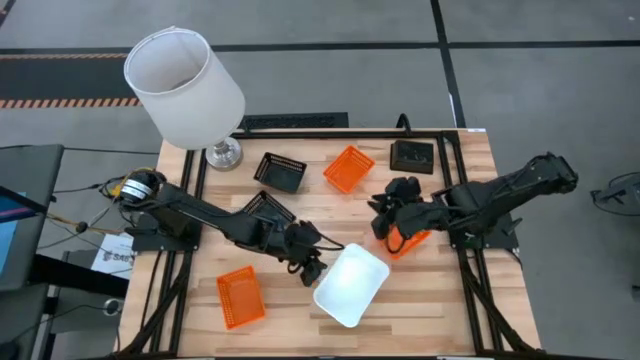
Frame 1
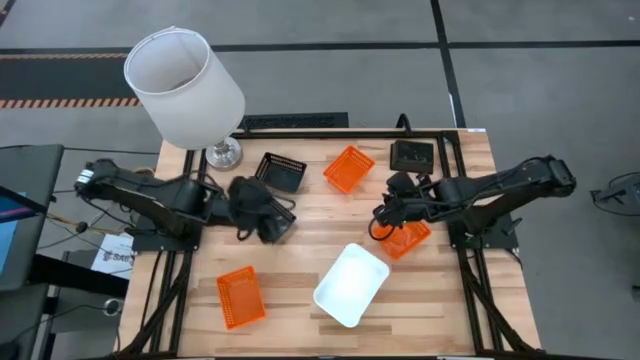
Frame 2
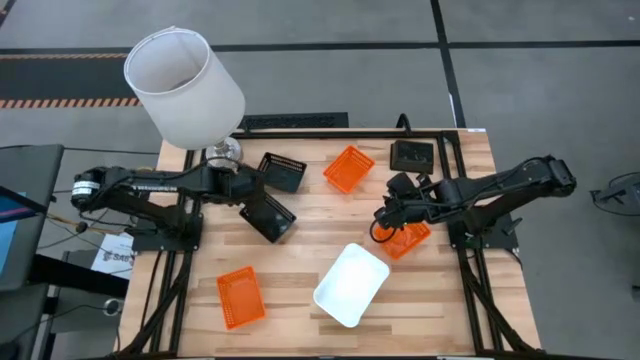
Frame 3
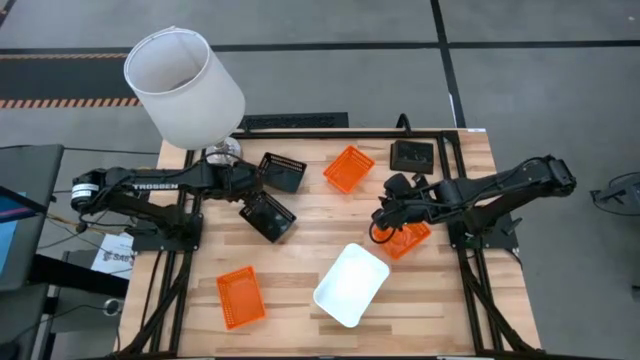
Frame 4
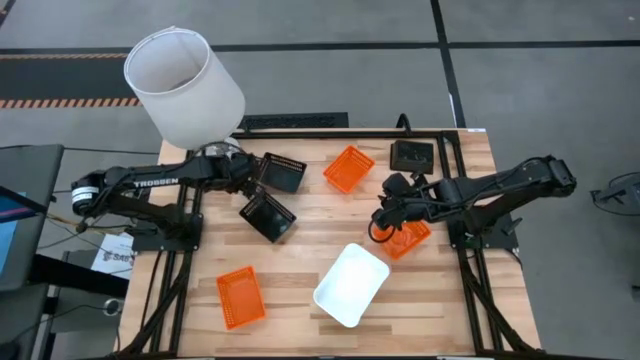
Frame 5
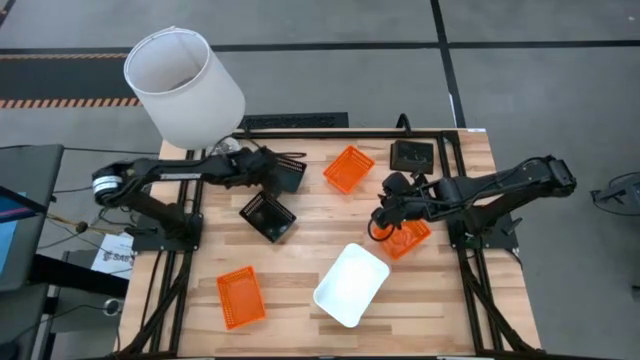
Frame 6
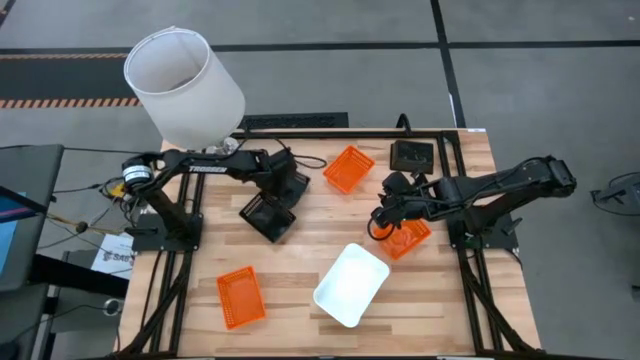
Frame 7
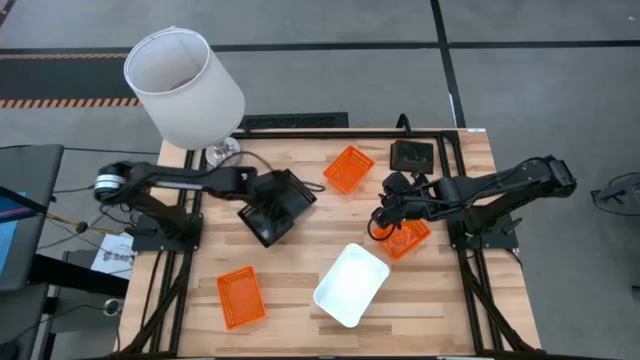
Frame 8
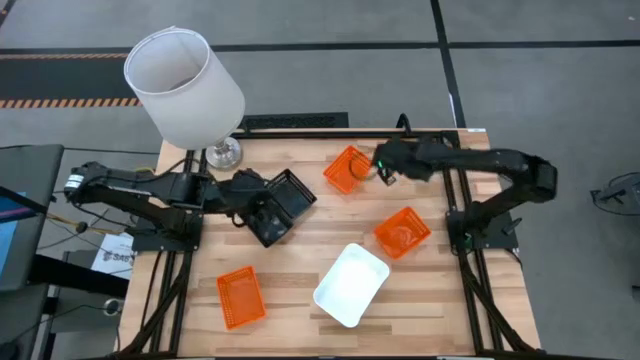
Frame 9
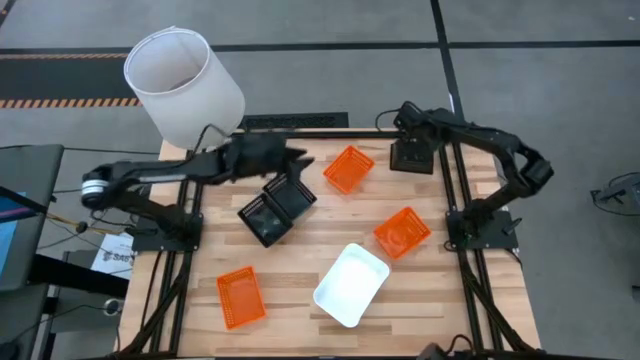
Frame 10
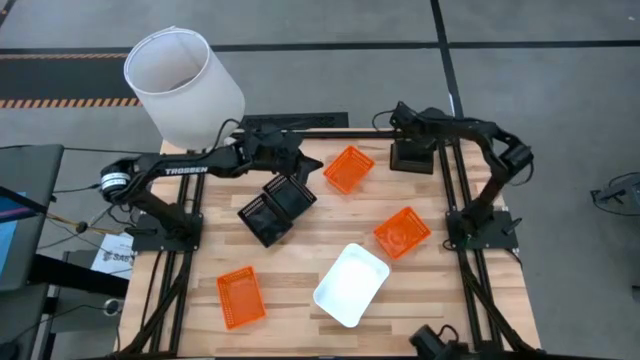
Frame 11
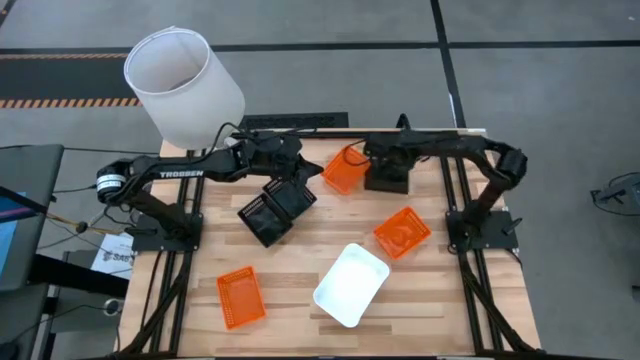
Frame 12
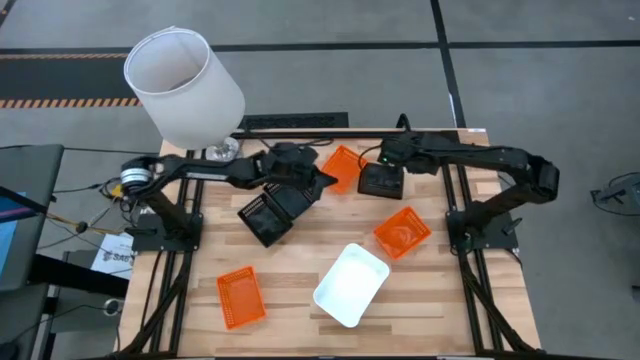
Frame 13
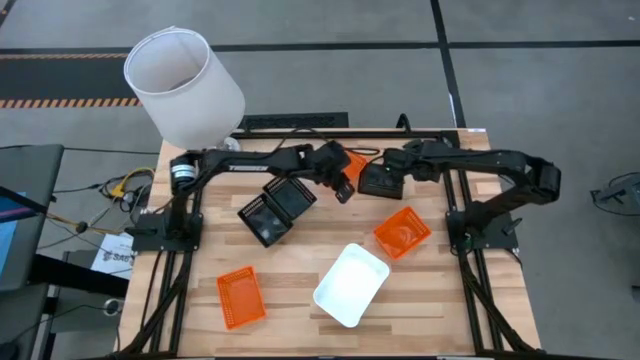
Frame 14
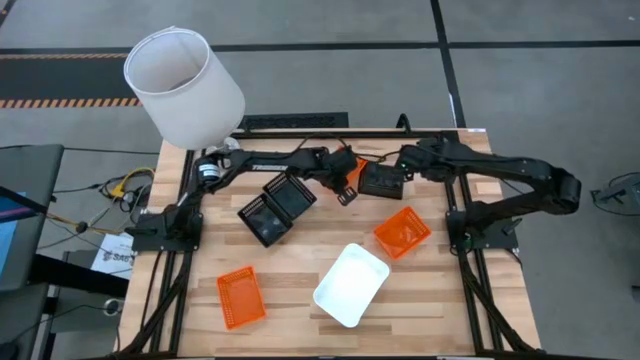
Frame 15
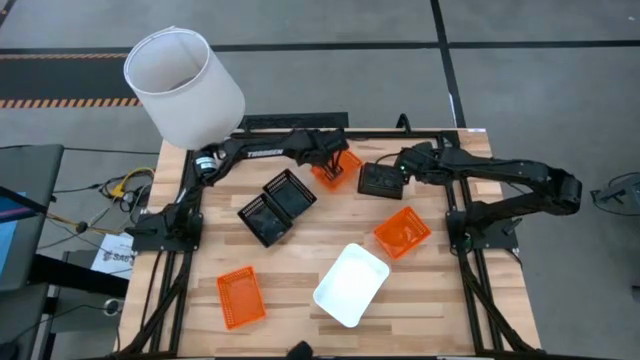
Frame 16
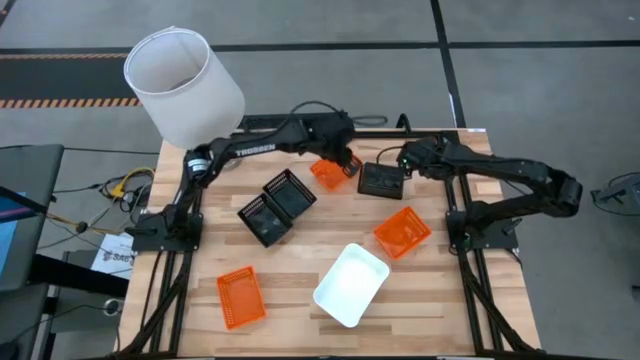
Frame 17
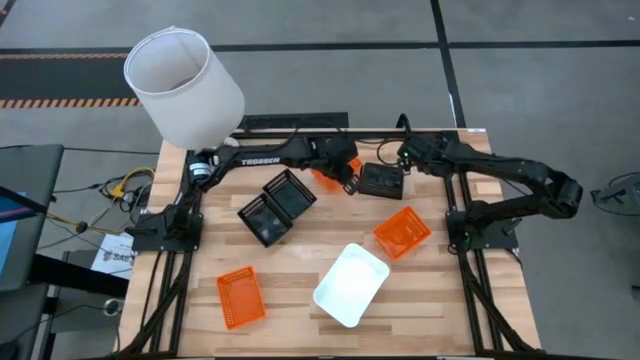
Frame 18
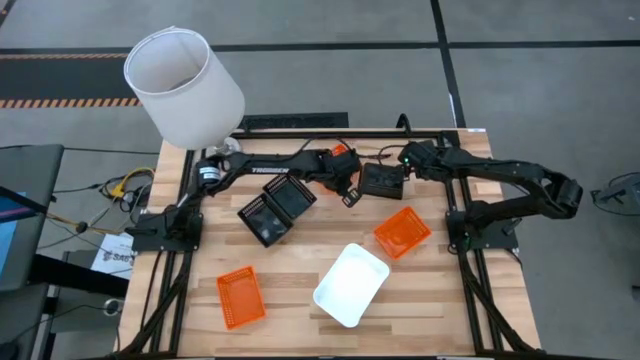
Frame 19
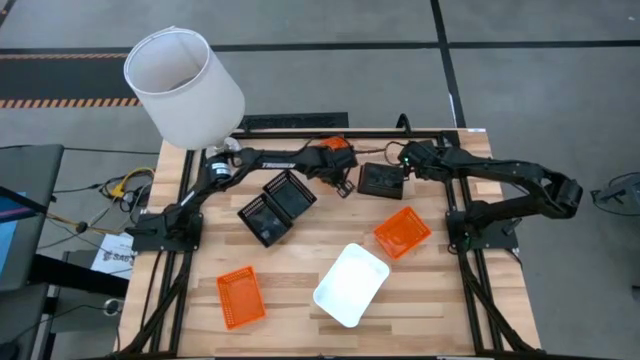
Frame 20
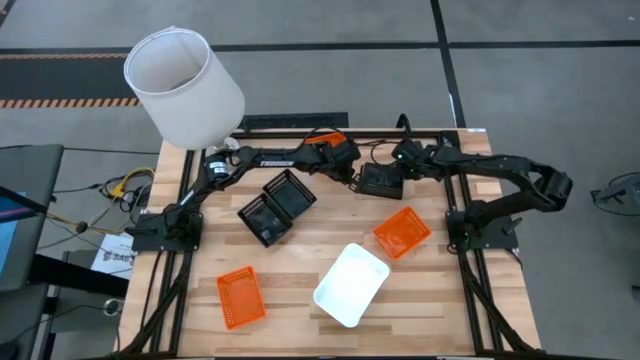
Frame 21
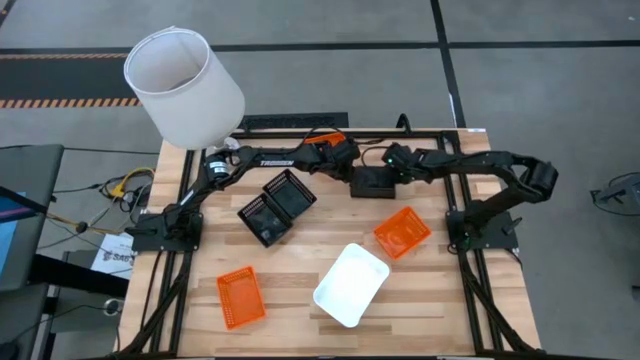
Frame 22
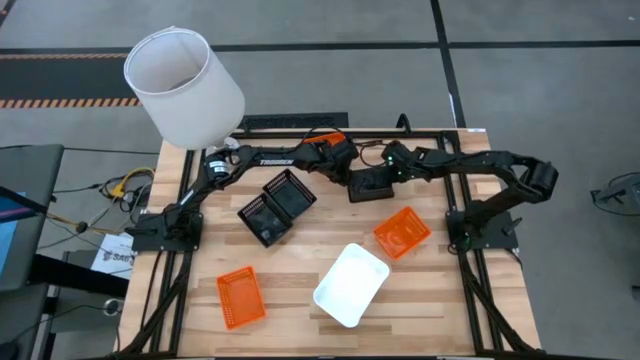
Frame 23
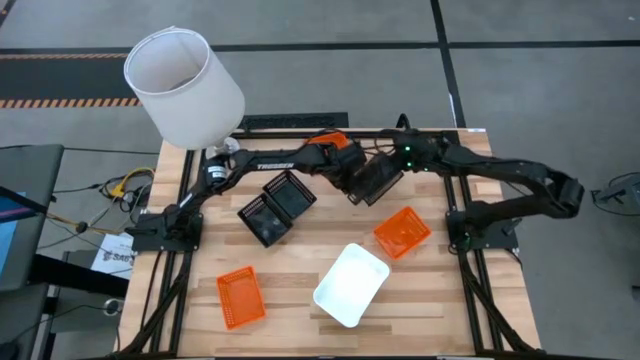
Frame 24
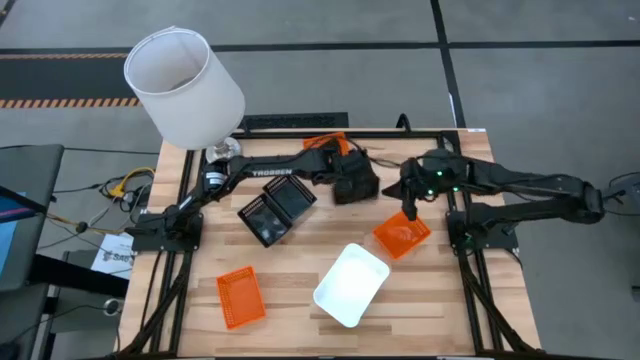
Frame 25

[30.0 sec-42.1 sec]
Adjust the bins

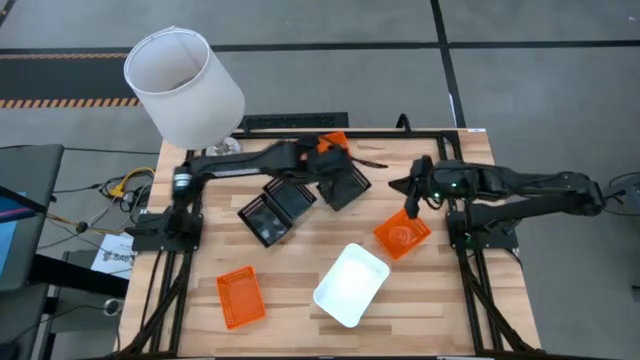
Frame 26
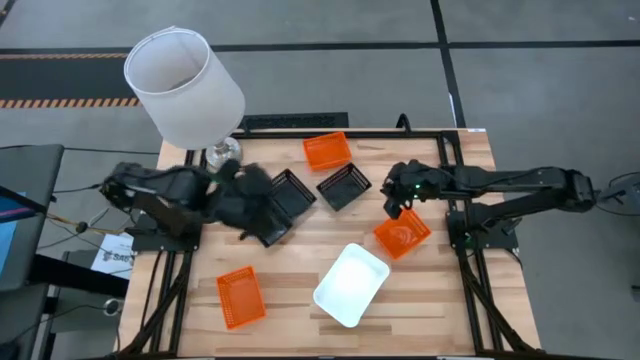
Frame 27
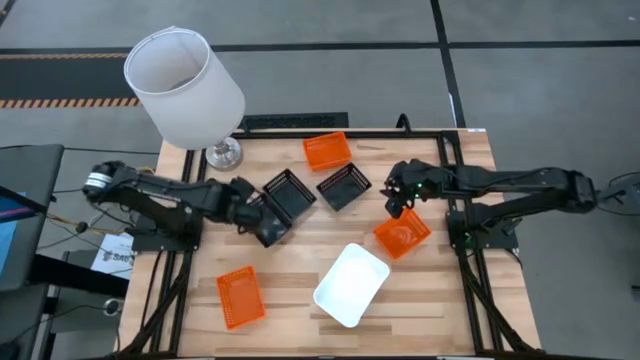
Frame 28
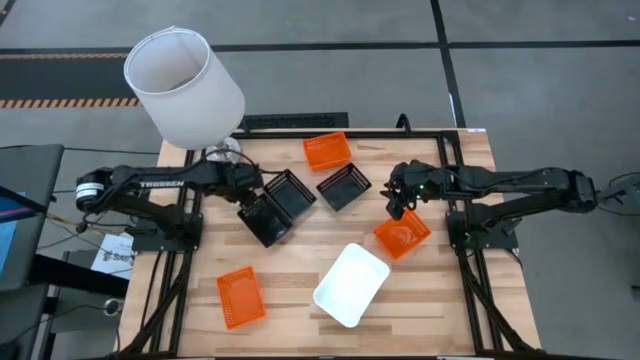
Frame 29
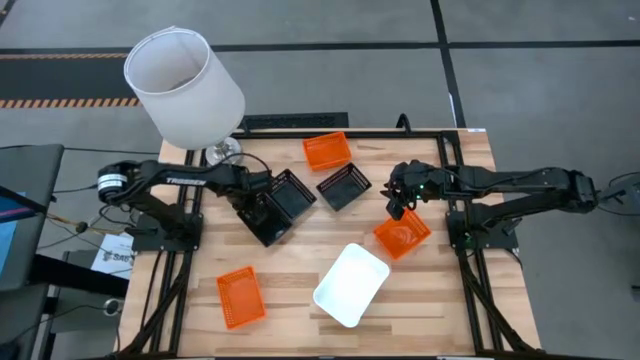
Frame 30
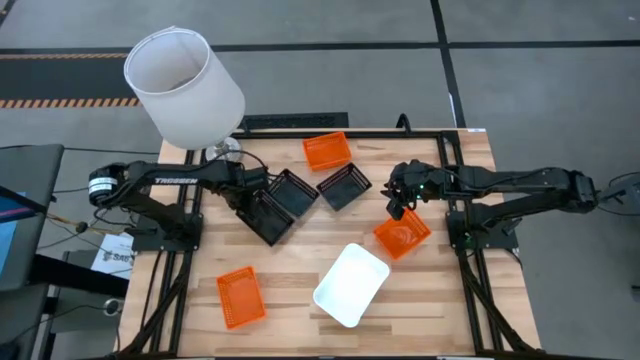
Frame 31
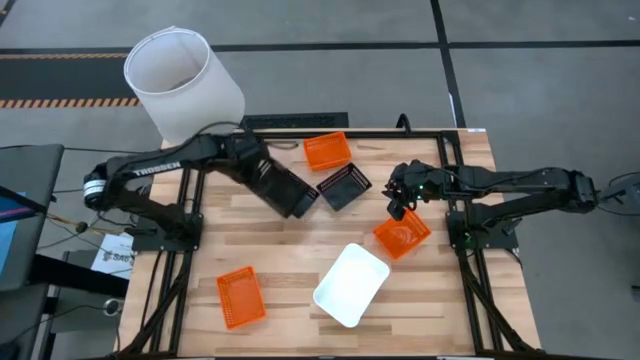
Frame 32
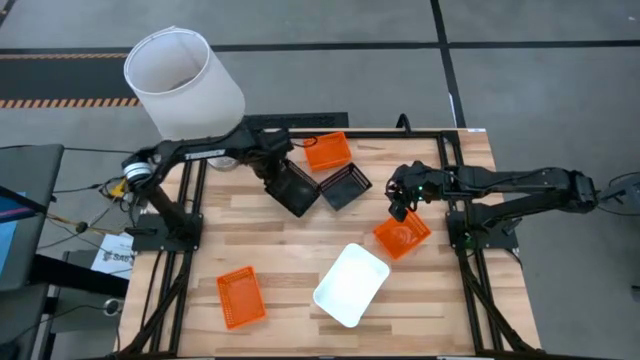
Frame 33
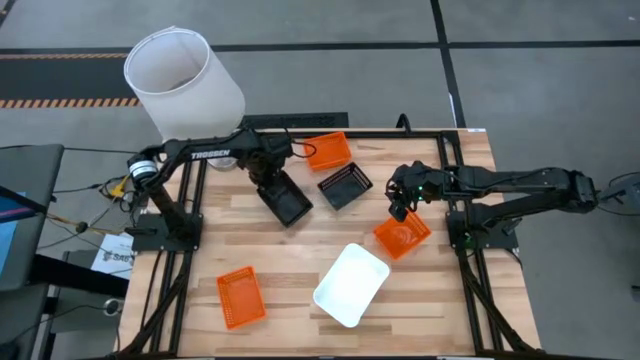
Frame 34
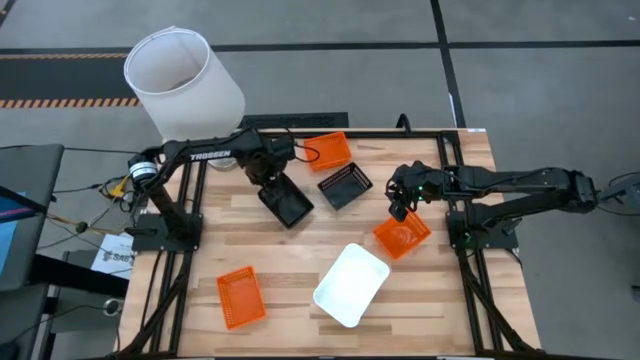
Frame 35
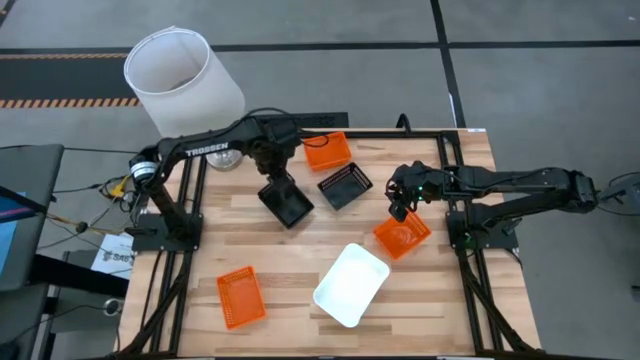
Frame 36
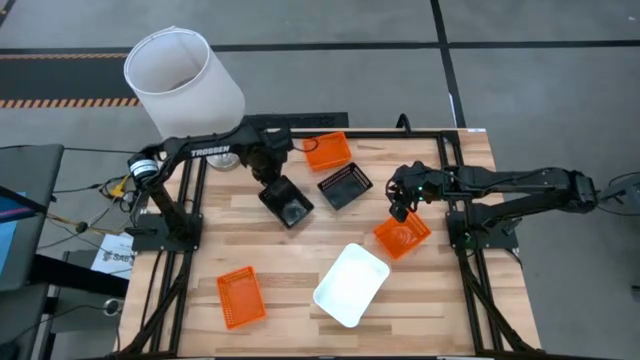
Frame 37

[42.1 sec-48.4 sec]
Stack the bottom black bin on the top left black bin

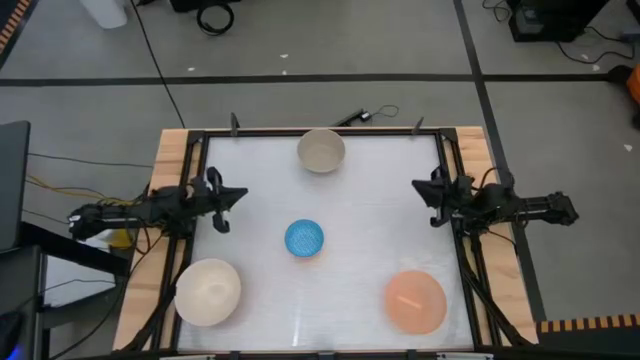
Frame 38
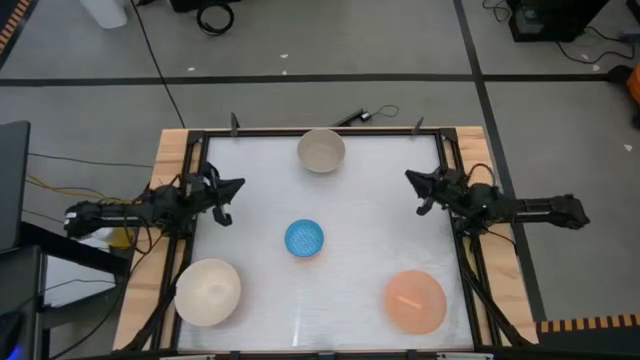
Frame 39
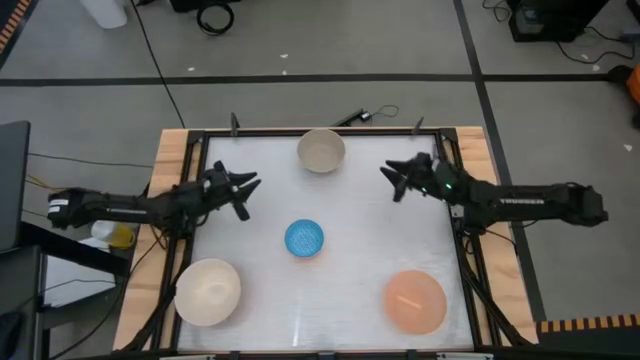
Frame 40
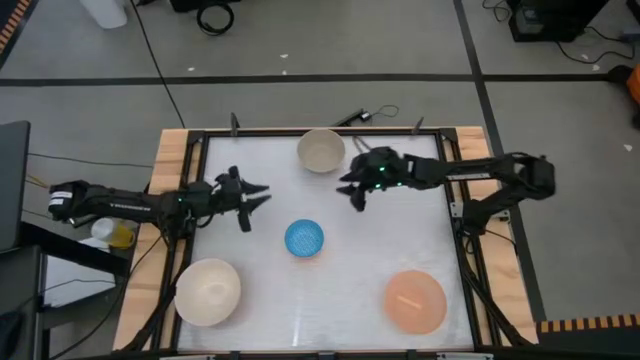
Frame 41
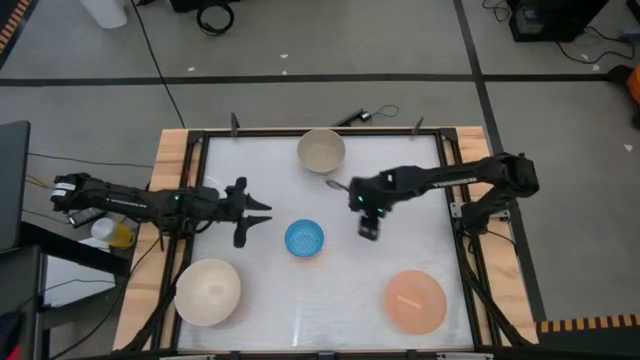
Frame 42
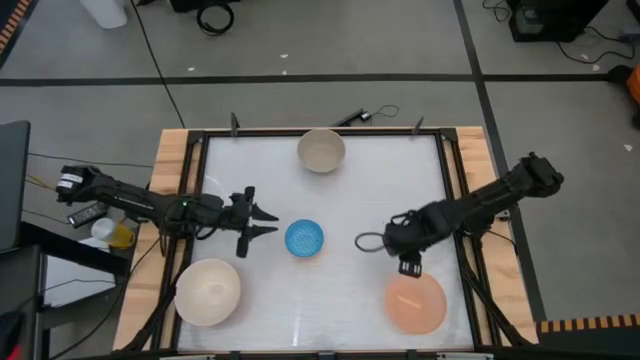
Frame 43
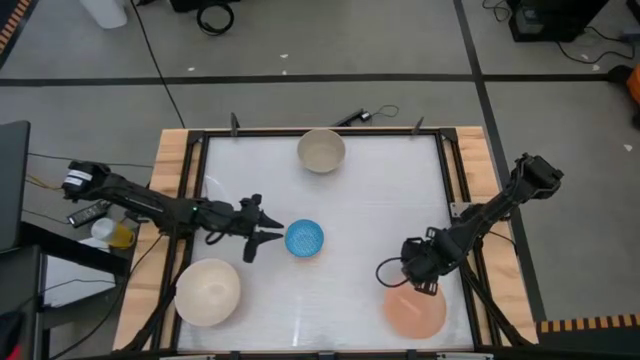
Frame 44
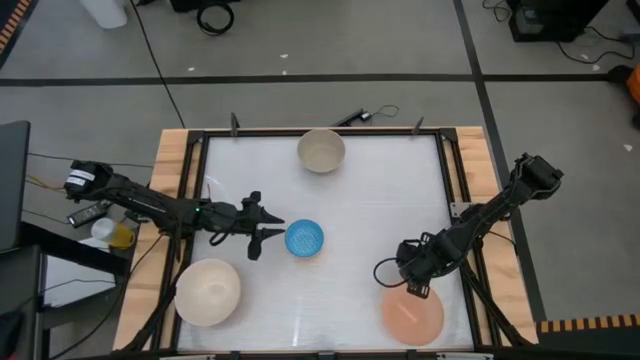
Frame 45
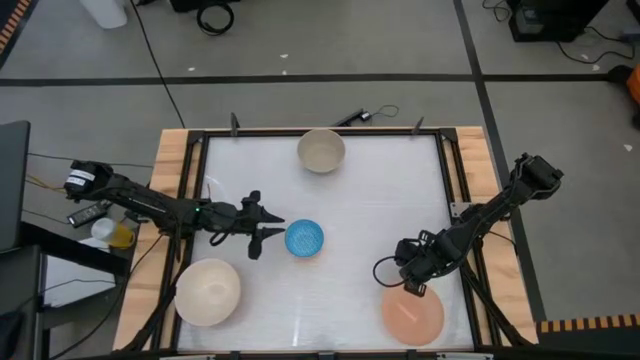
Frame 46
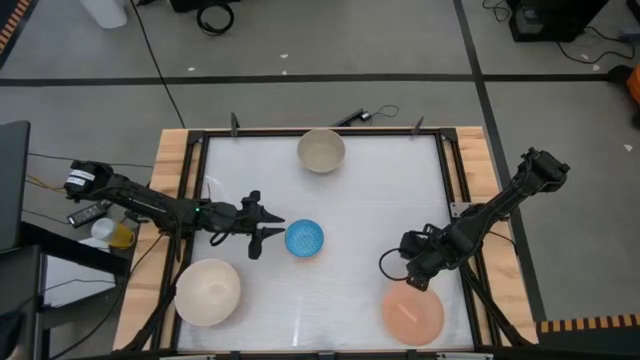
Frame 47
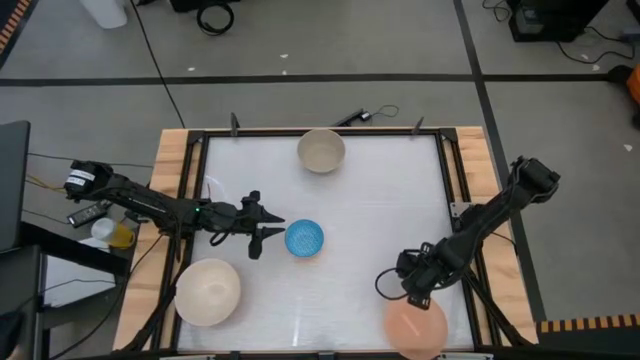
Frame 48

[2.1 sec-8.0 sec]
Stack the orange bowl on top of the big white bowl
